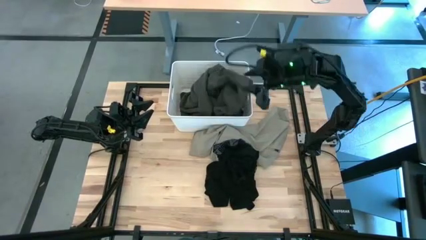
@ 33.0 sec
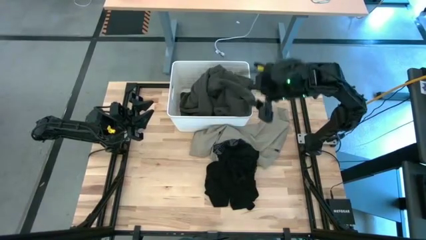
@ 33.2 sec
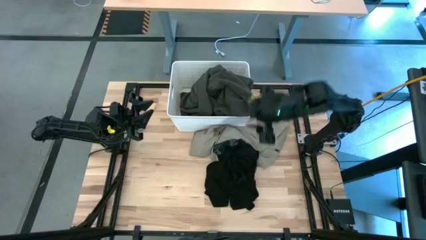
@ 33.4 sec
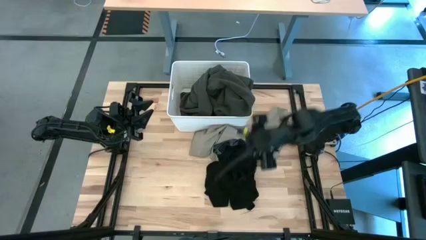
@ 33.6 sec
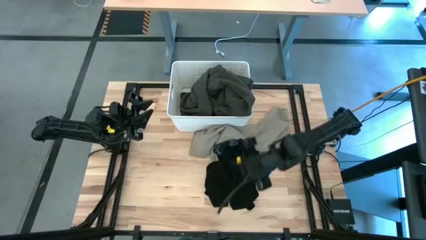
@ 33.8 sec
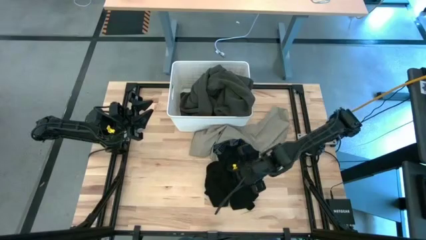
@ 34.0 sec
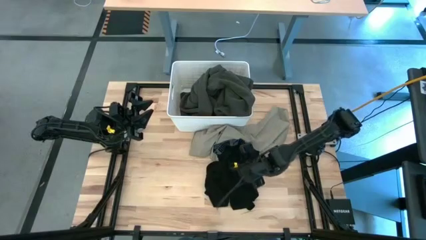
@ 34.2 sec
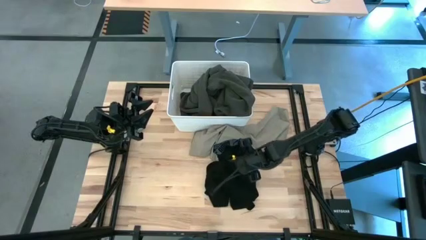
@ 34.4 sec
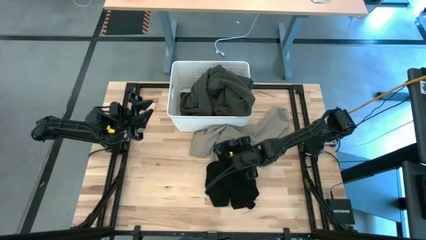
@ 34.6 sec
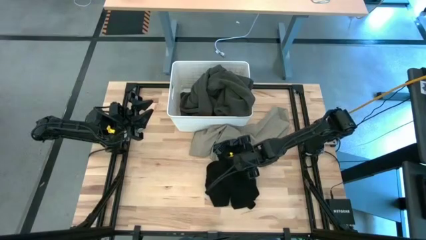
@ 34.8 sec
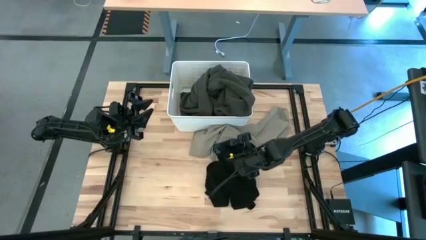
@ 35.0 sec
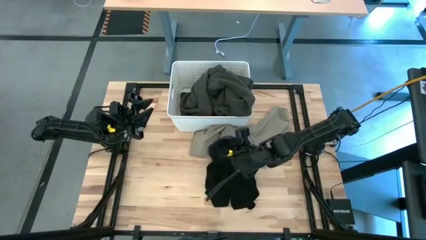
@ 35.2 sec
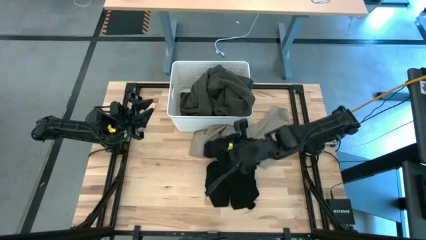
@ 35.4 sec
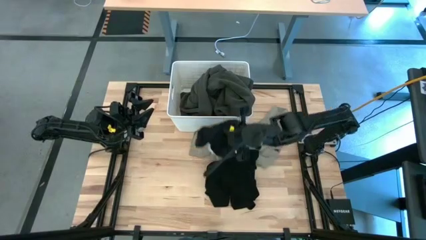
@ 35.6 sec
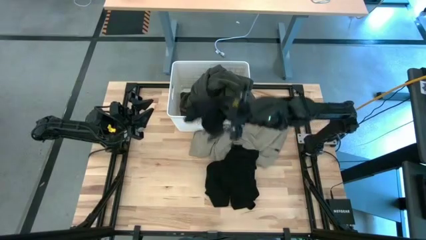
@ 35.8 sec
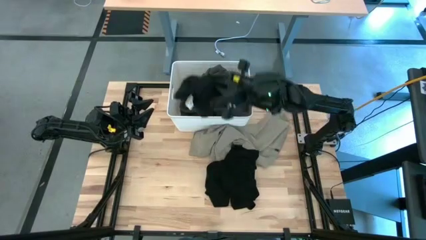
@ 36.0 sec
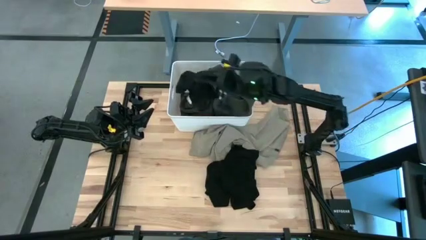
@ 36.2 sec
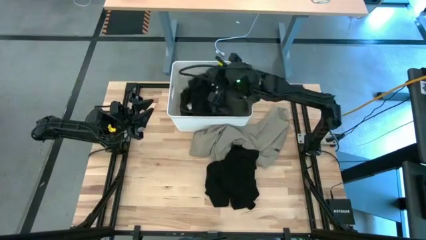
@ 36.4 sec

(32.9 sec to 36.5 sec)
Task: Sort clothes
Put the black boxer into the white bin

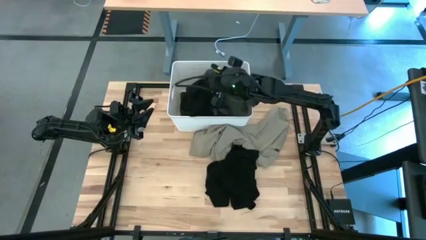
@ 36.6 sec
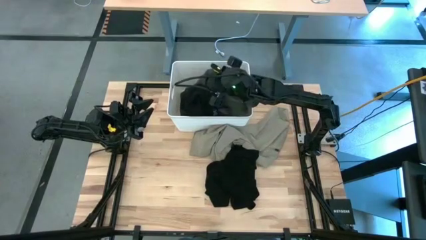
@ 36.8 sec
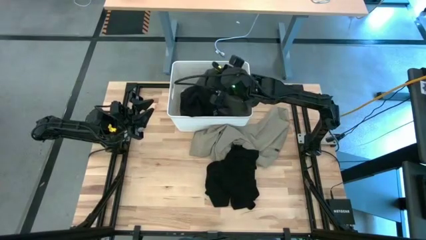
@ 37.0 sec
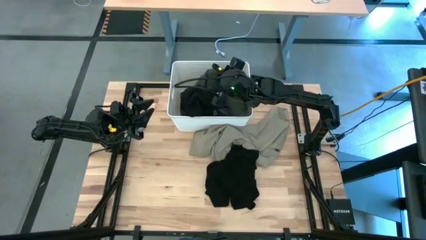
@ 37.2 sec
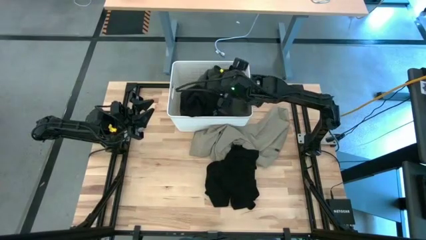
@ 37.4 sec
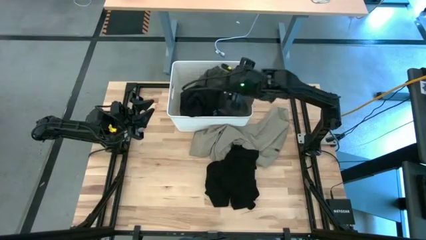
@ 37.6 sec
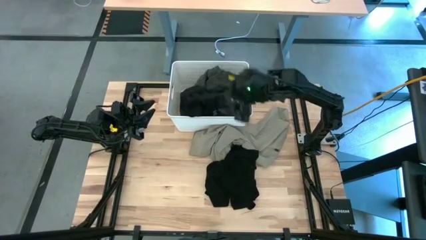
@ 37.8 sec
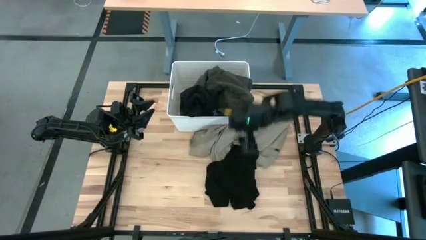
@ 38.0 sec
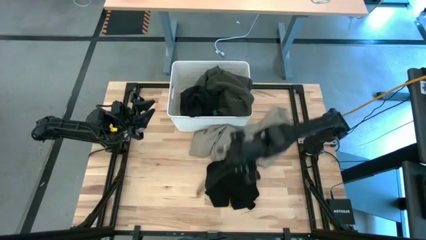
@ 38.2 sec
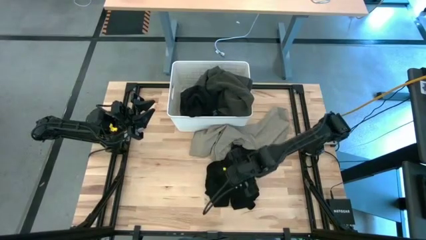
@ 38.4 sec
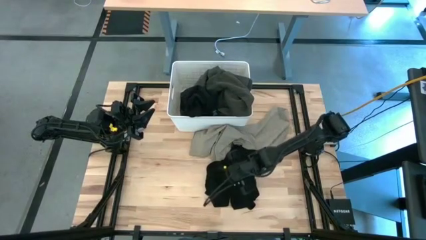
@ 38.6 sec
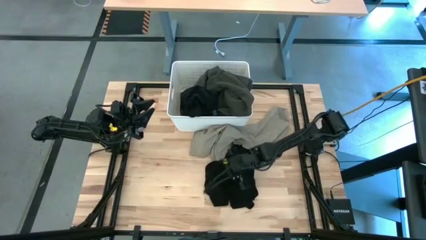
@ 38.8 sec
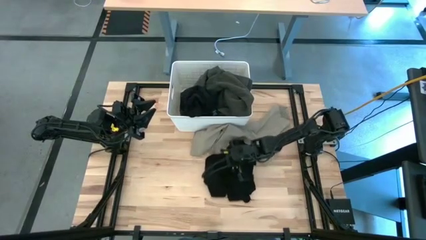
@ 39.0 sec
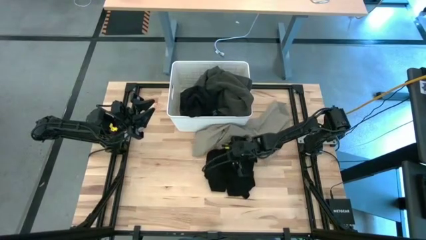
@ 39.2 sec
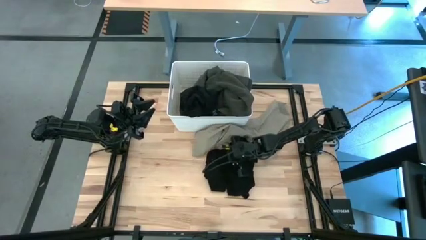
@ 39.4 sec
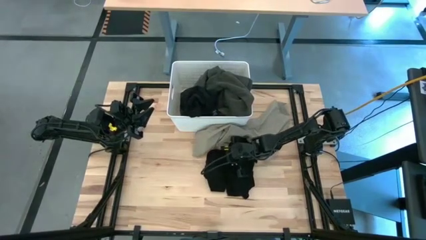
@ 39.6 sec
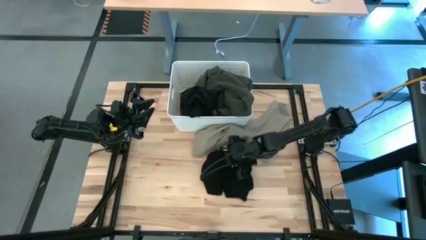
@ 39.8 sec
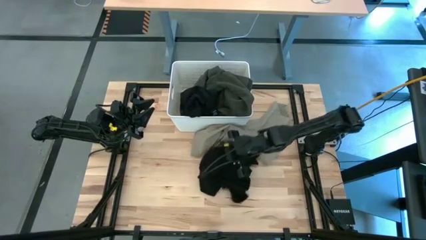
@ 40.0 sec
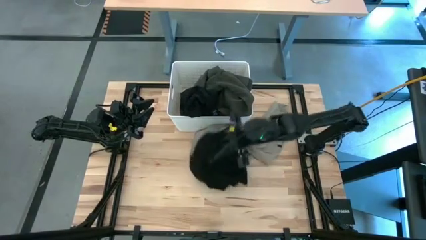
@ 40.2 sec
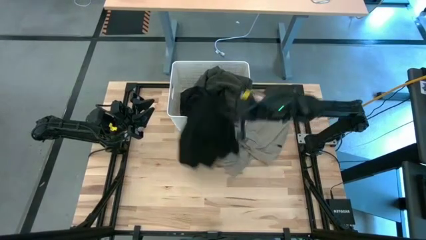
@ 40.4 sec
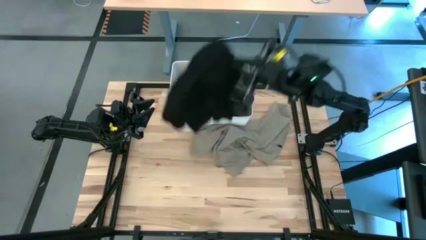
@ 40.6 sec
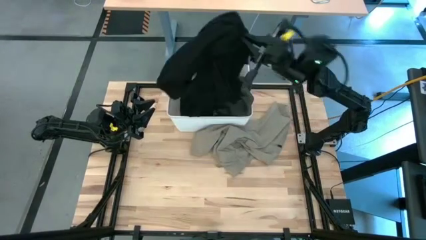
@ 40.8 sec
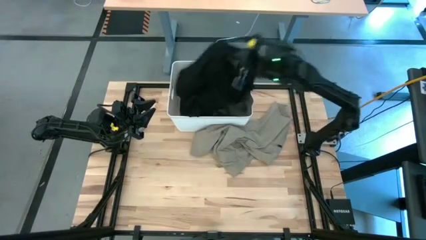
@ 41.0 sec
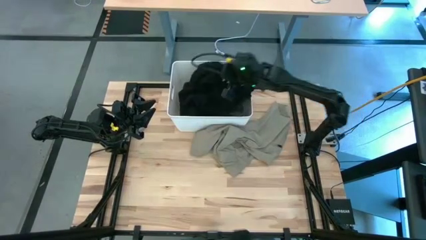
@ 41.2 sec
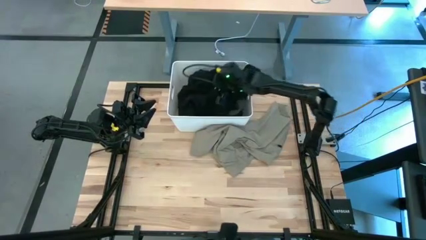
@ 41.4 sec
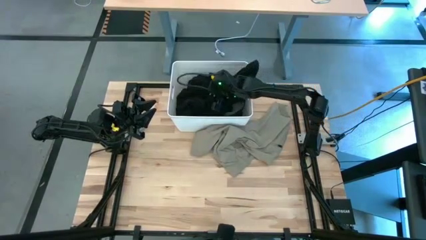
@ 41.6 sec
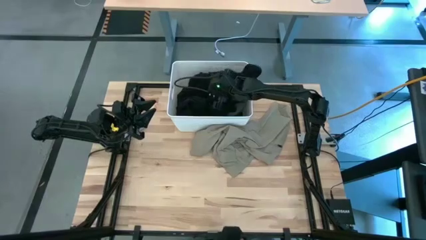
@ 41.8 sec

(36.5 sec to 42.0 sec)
Put the black shirt into the white bin

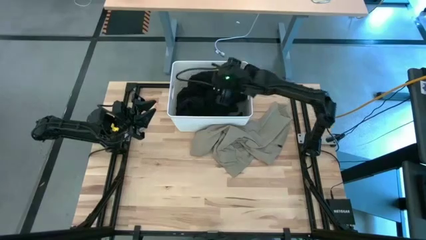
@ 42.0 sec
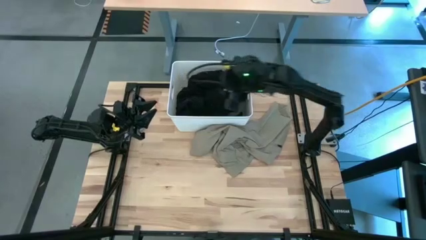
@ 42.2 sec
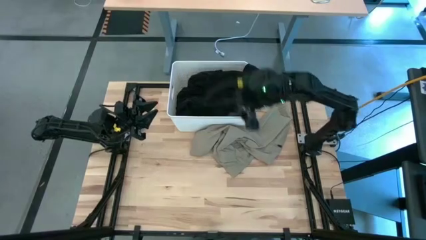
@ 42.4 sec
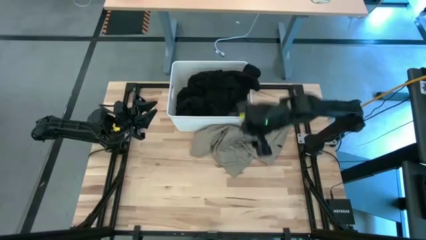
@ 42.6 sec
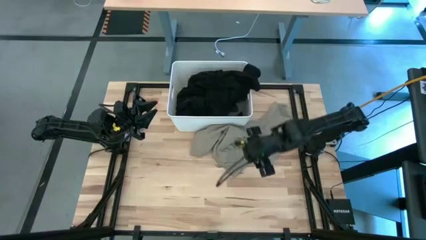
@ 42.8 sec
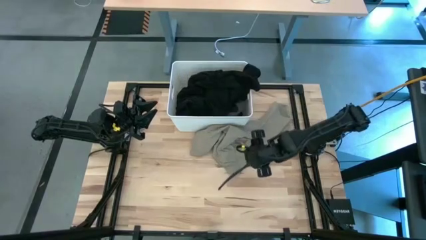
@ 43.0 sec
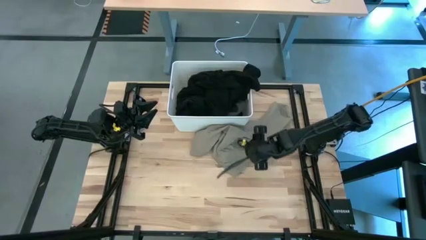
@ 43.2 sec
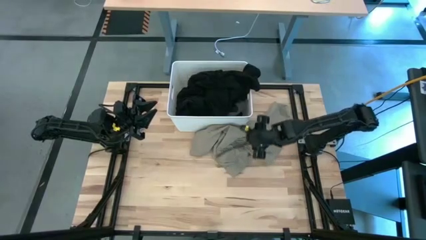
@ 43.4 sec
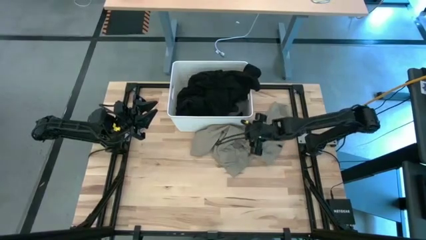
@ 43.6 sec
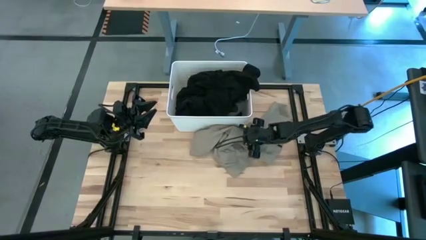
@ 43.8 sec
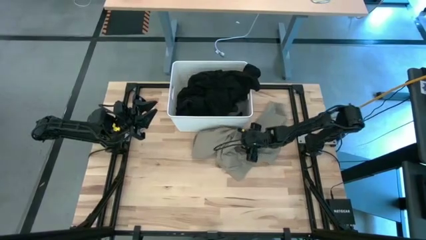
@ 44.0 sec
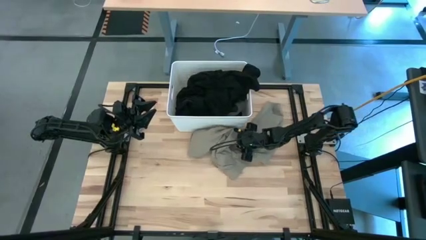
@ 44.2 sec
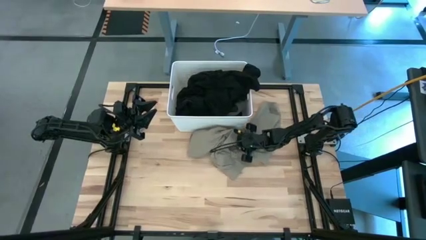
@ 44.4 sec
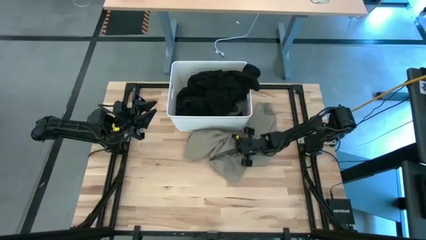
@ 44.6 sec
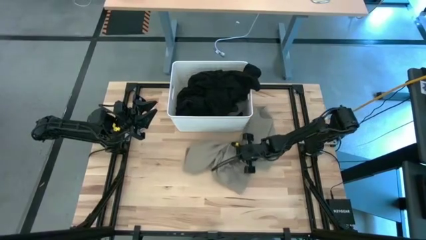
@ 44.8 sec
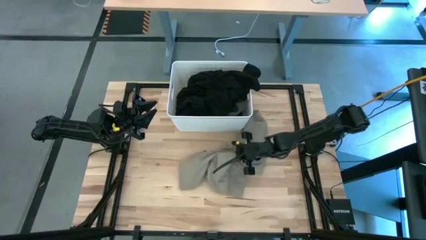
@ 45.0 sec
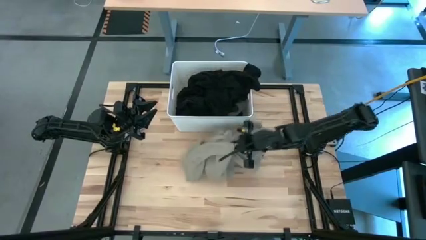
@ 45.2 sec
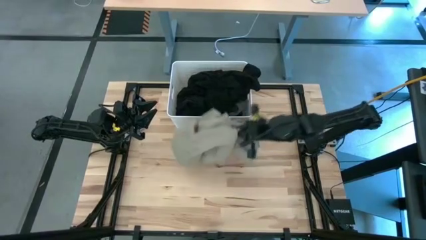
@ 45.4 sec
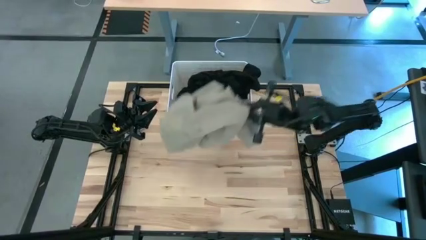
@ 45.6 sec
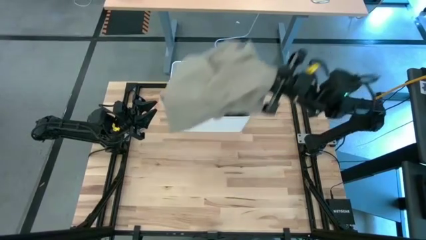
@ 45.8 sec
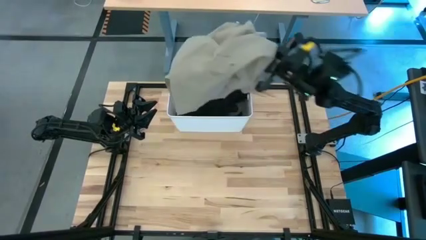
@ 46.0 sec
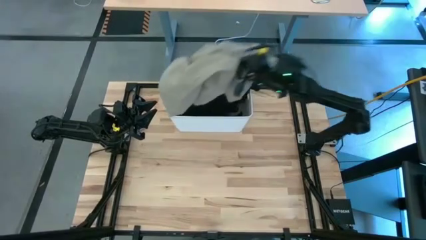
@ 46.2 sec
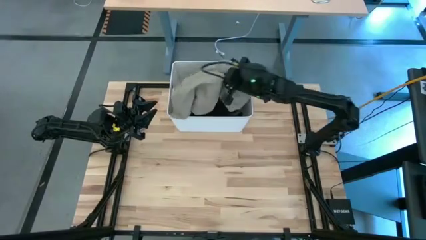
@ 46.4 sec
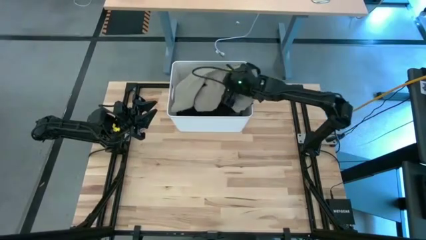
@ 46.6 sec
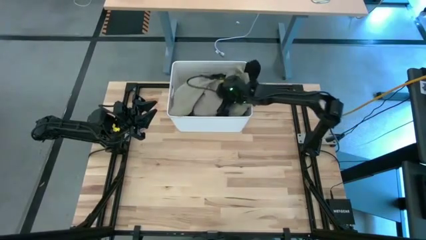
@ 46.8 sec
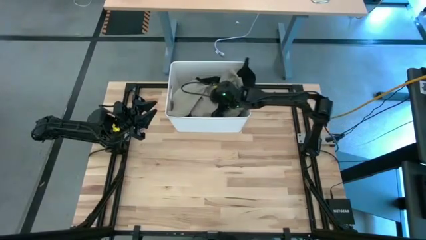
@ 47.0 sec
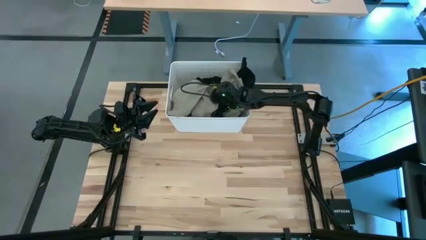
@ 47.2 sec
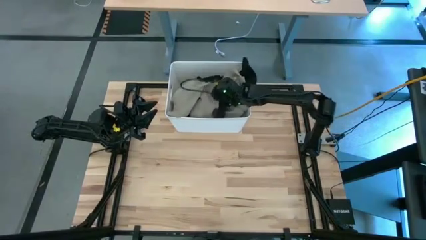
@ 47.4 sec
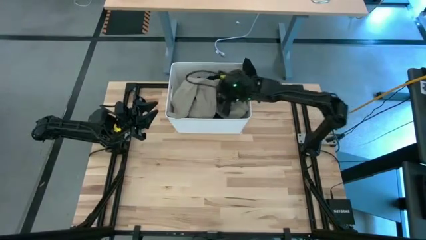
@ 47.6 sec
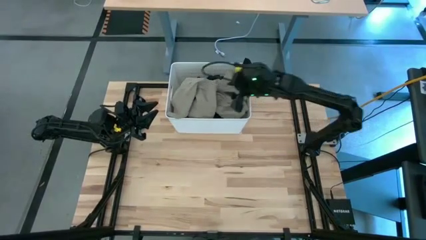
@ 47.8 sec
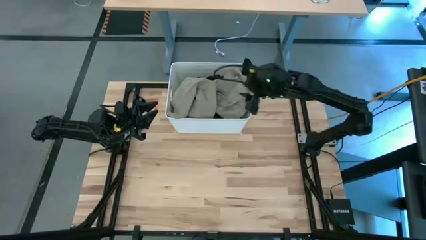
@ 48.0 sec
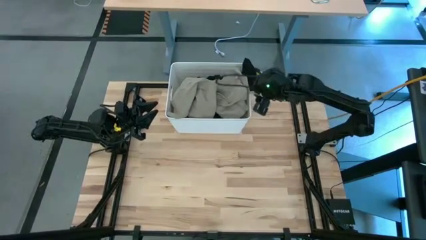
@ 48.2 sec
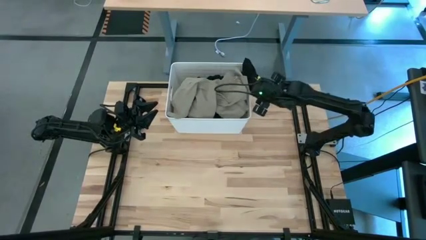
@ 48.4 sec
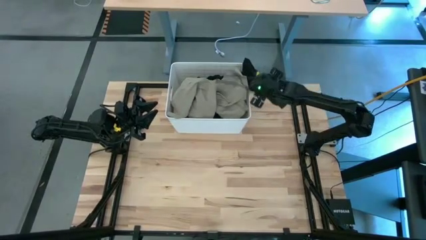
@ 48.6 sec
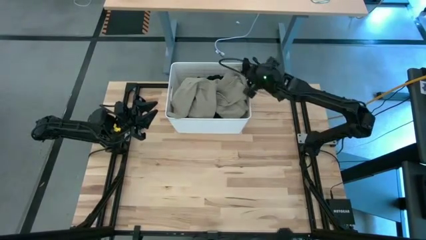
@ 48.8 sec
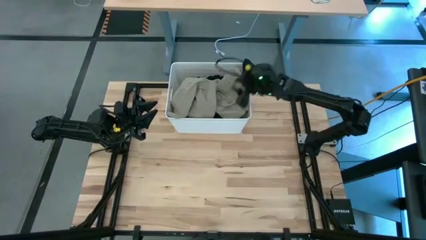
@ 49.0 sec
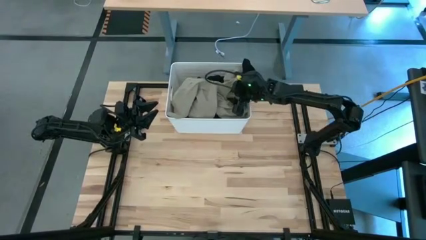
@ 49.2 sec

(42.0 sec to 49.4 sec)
Put the brown shorts into the white bin
